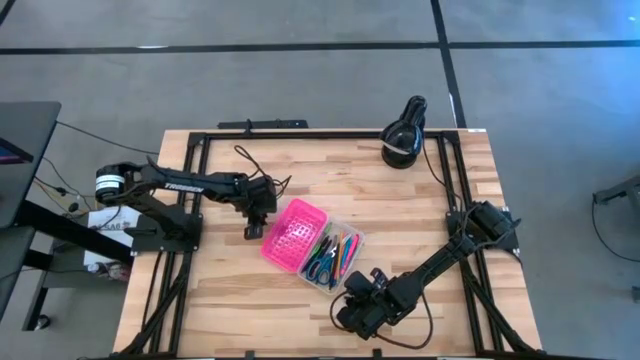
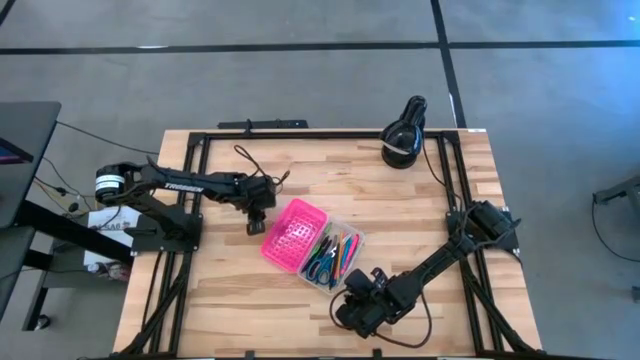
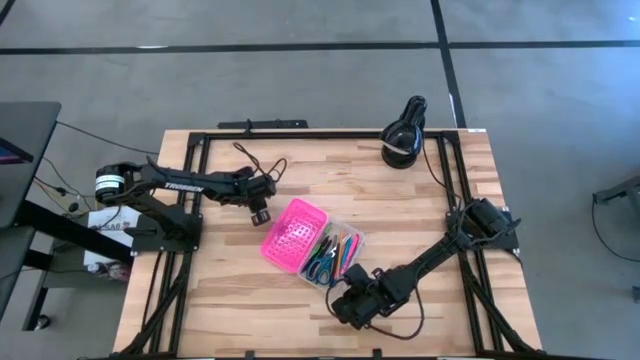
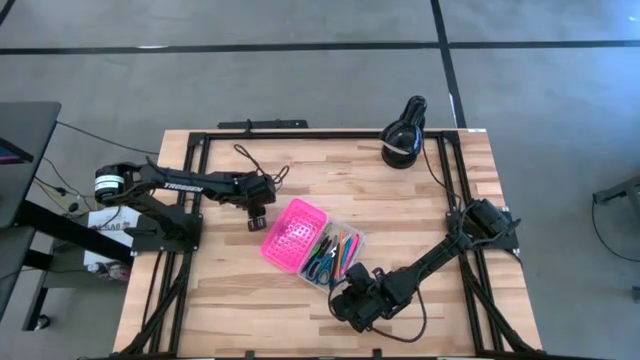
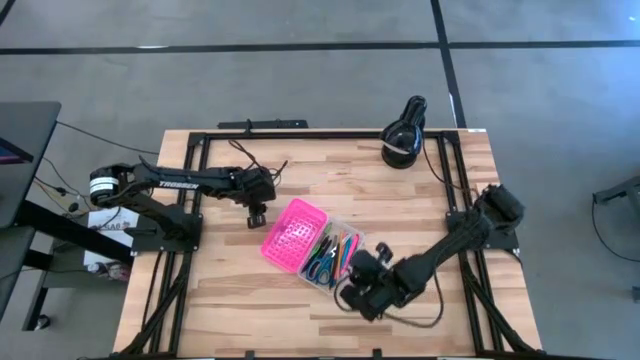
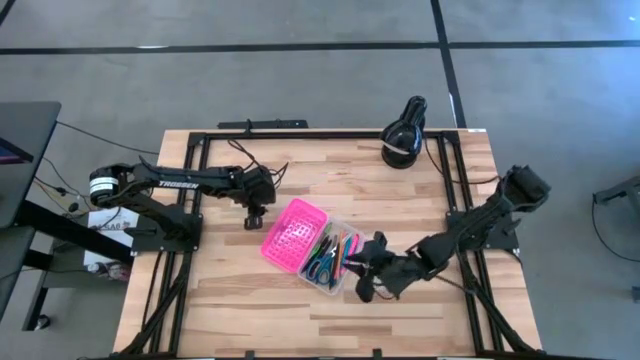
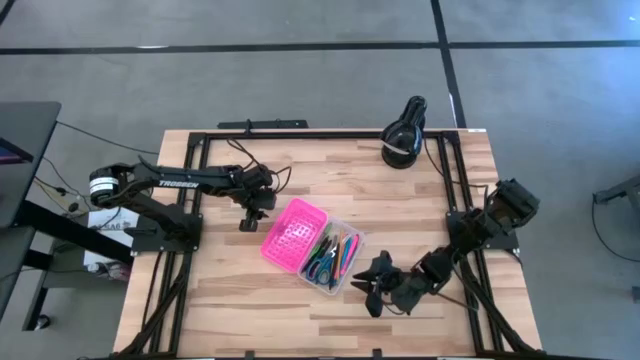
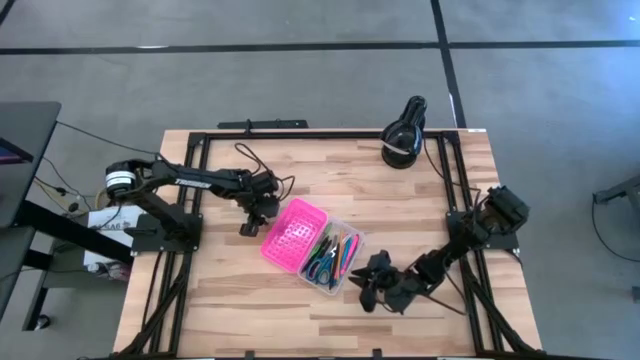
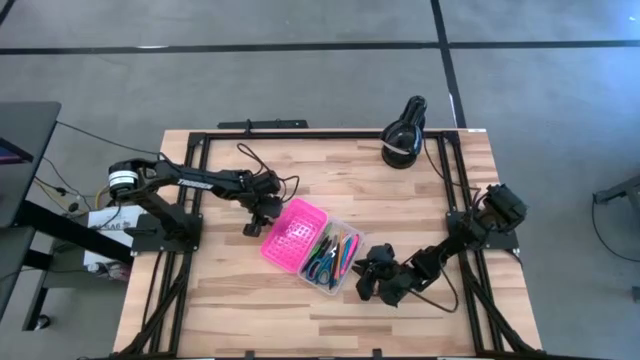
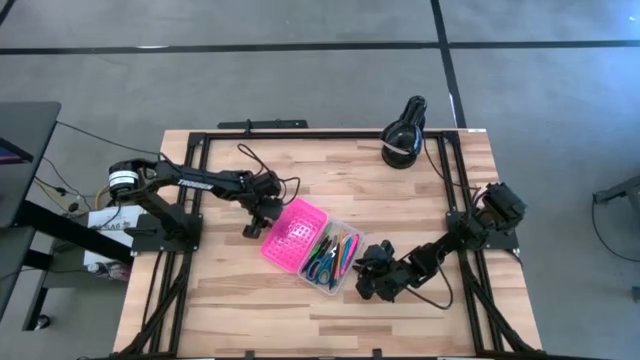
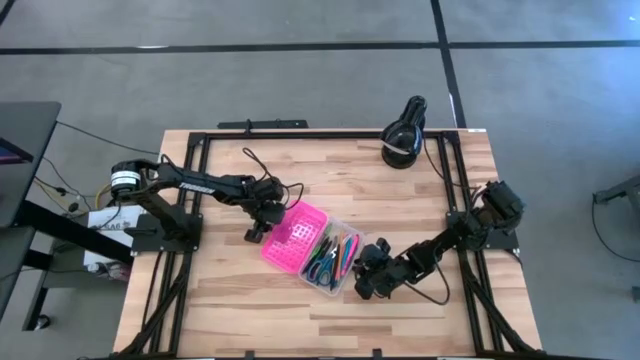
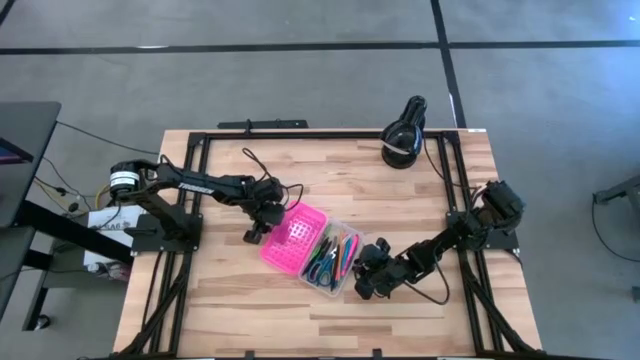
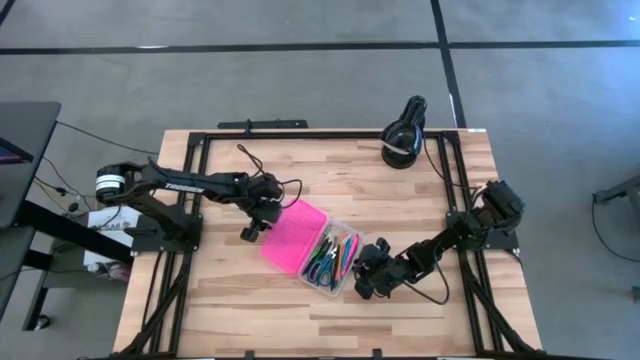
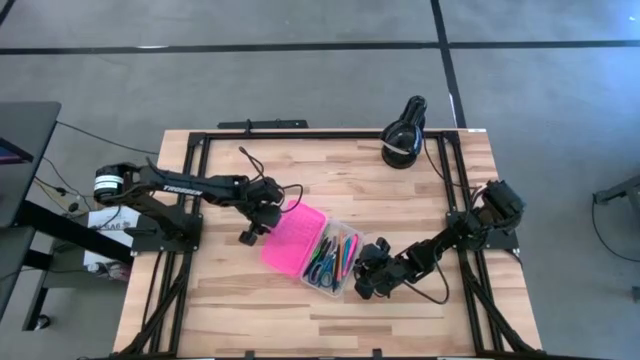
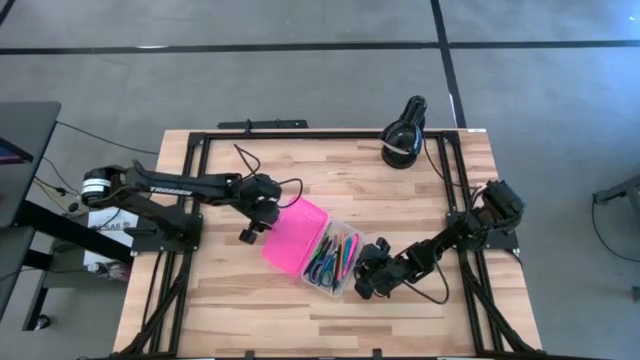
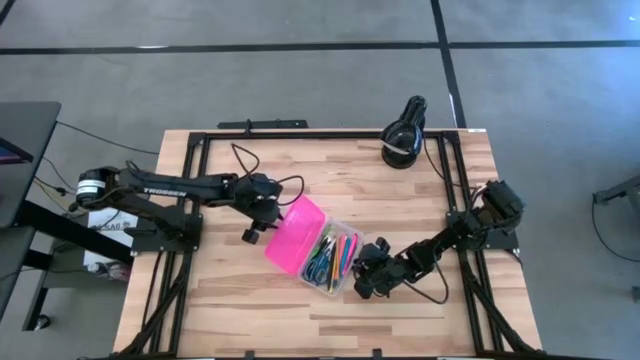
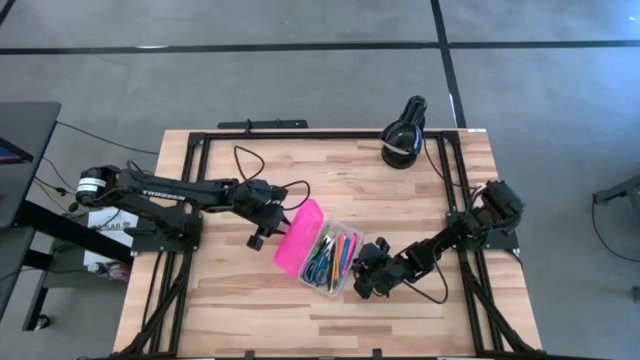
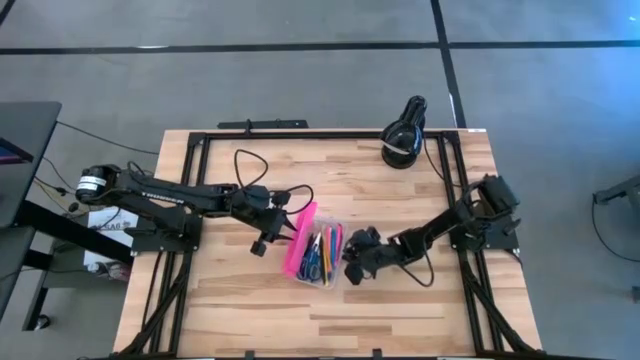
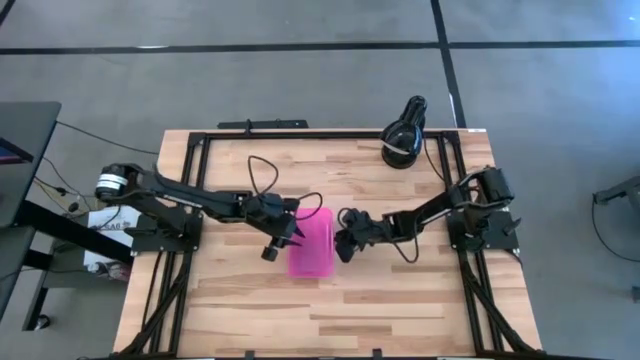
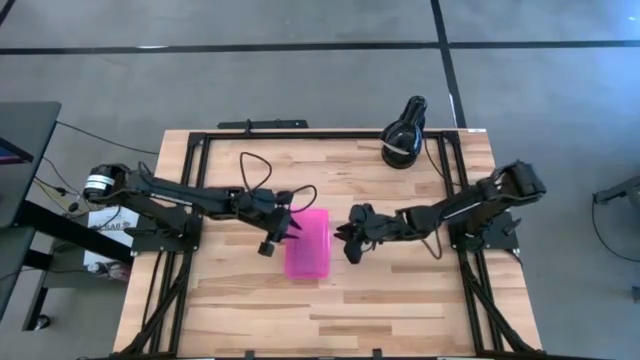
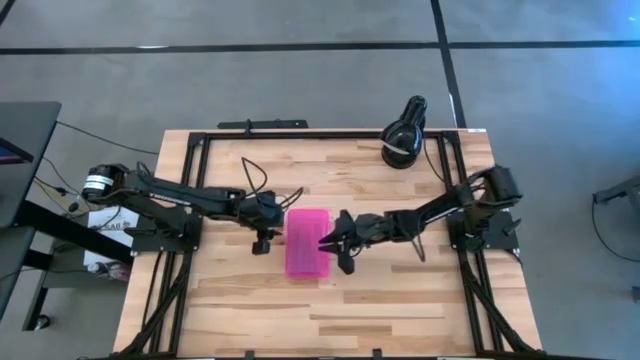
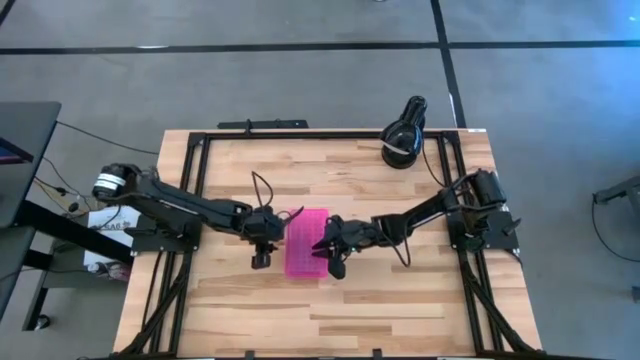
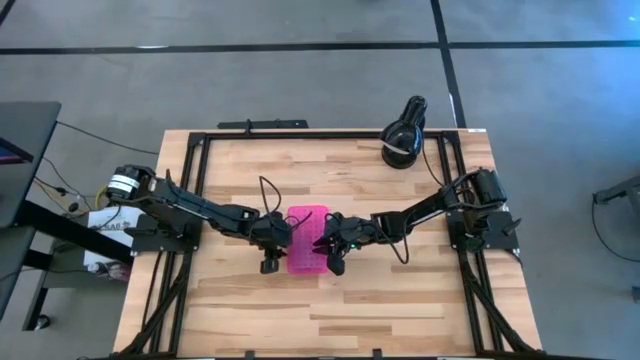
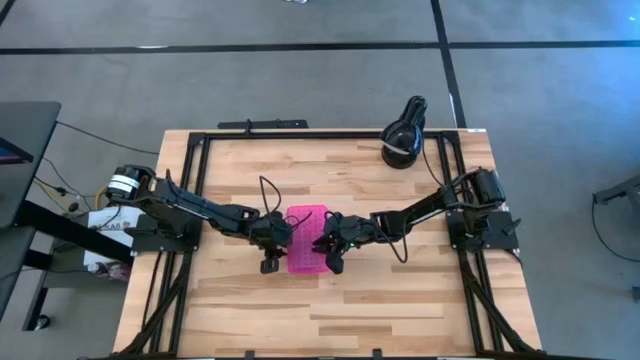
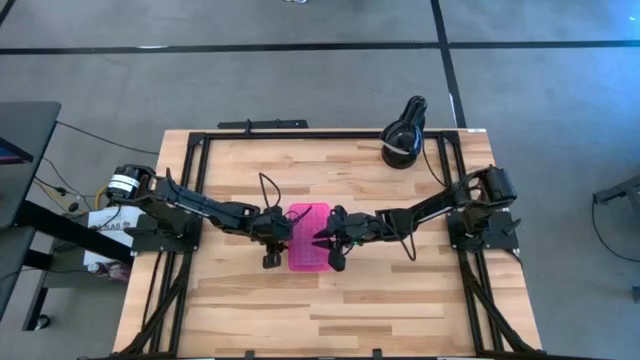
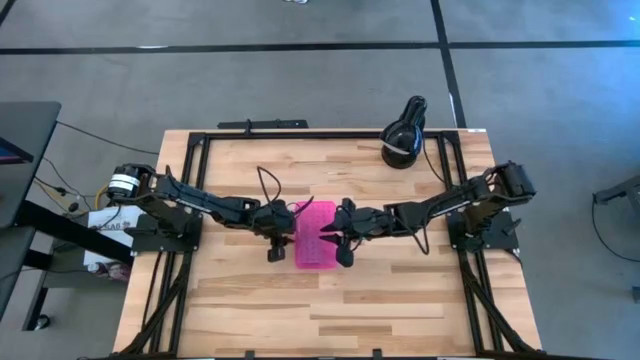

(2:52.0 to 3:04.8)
Task: Pick & place school supplies into a supply box
Close the pink supply box

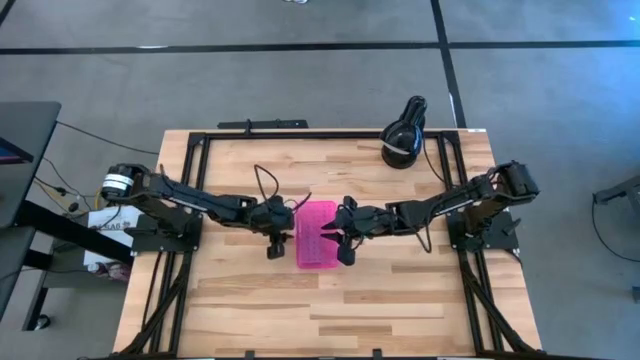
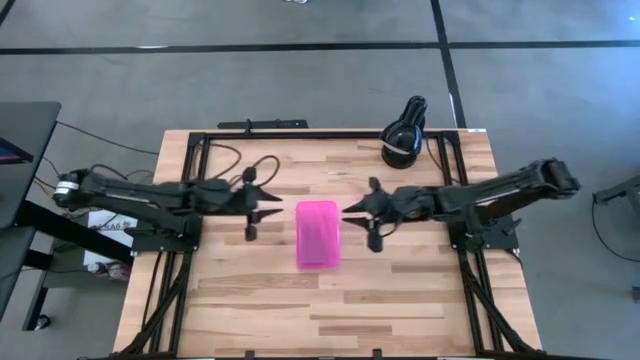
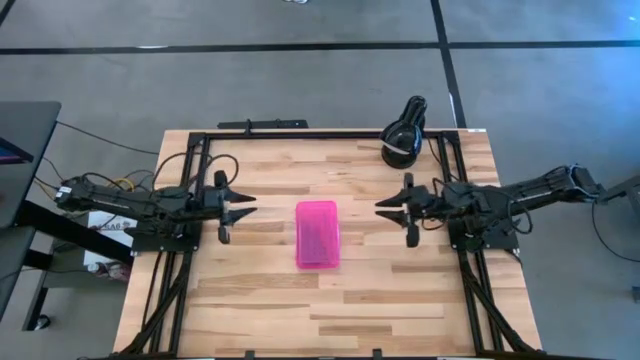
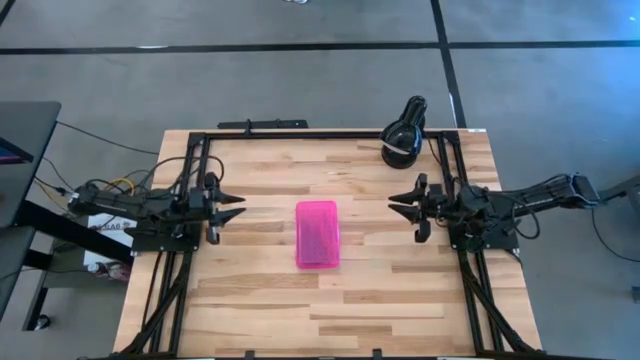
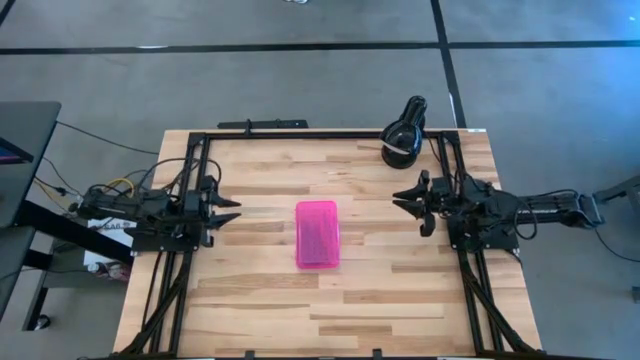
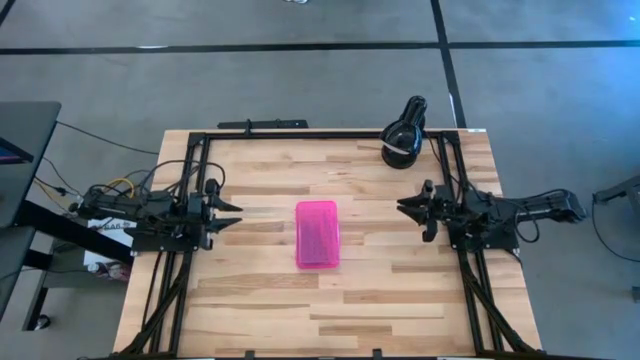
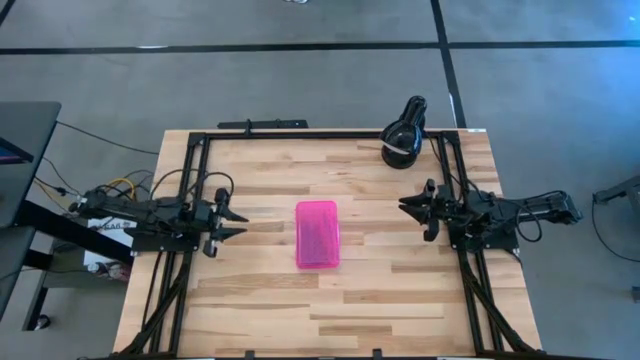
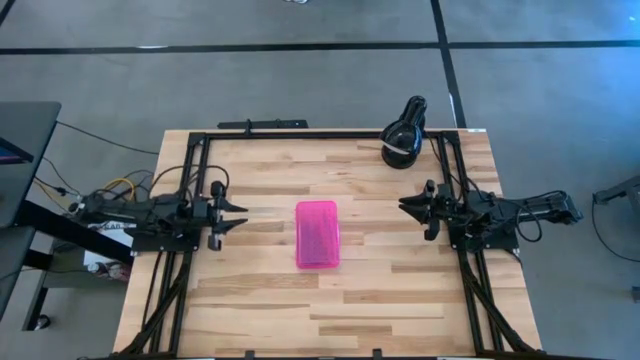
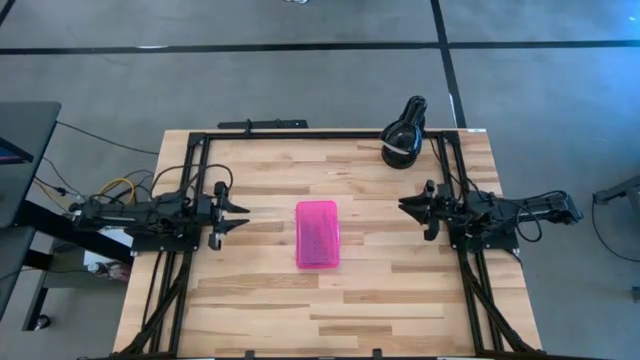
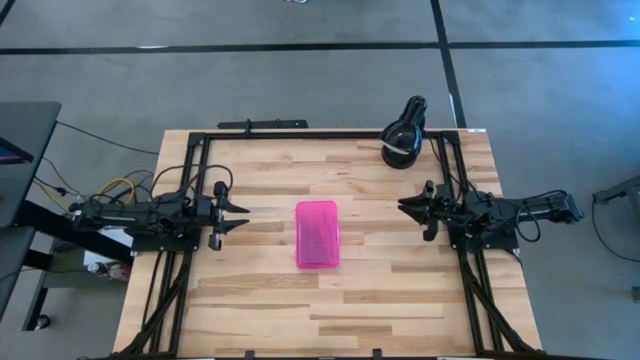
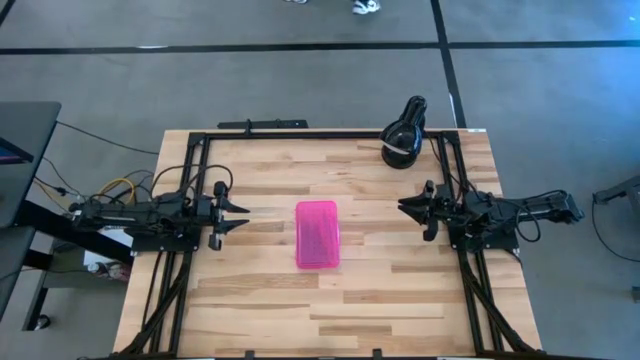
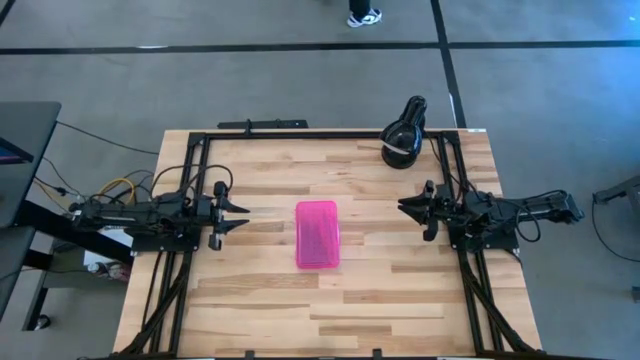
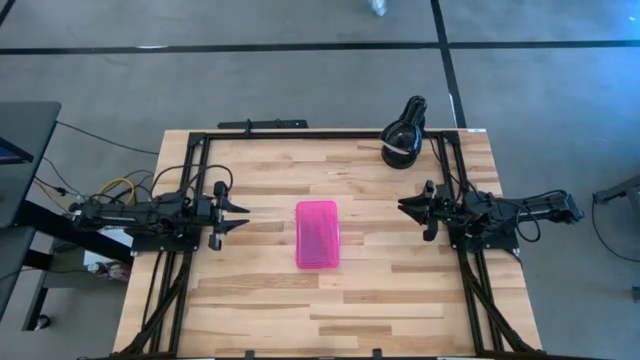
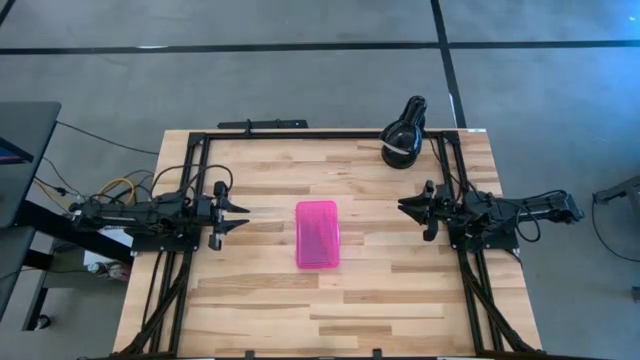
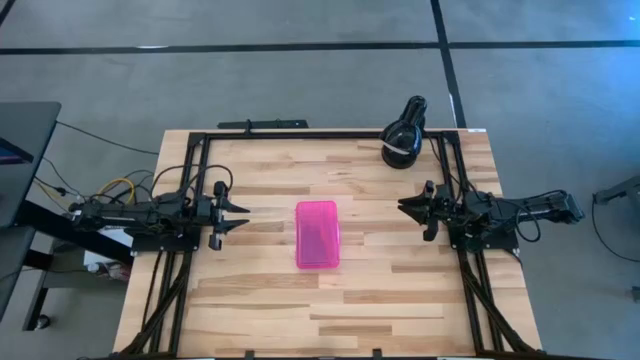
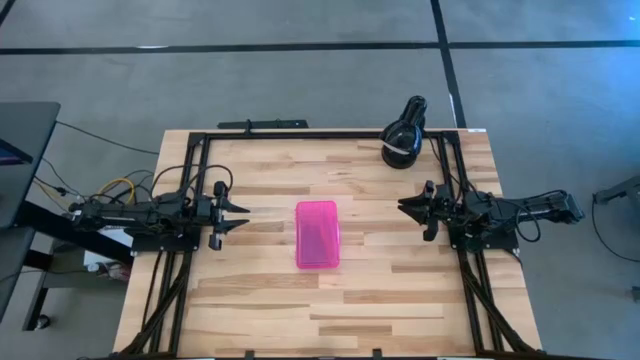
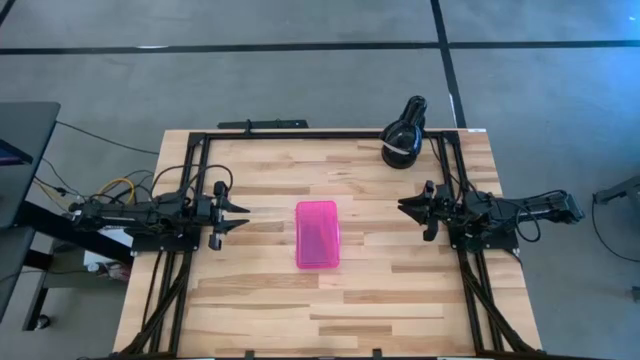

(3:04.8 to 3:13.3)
Return to Home Position
